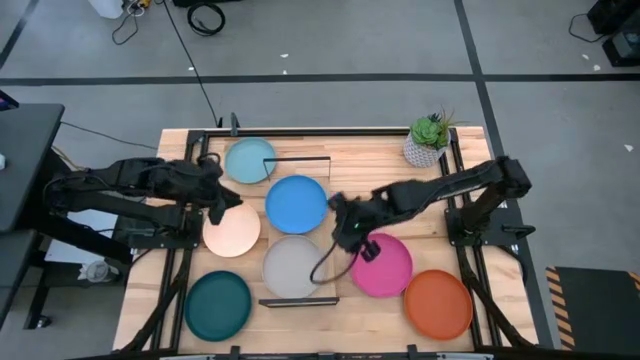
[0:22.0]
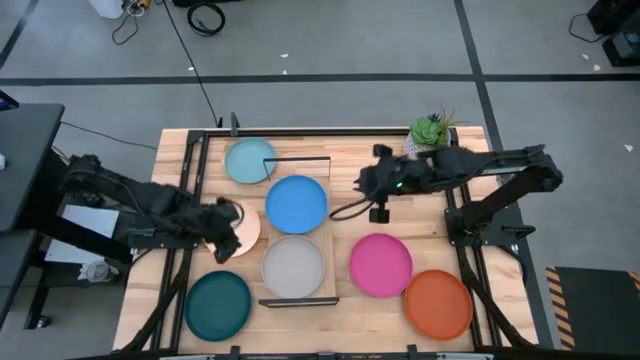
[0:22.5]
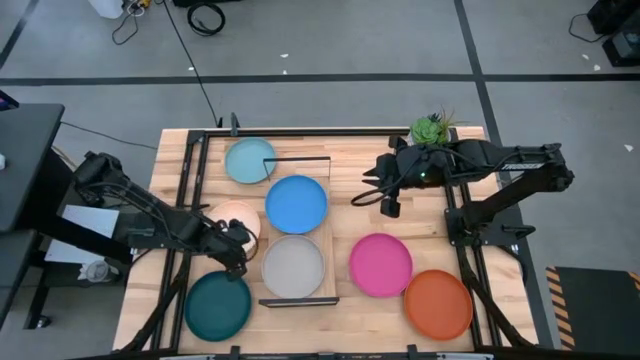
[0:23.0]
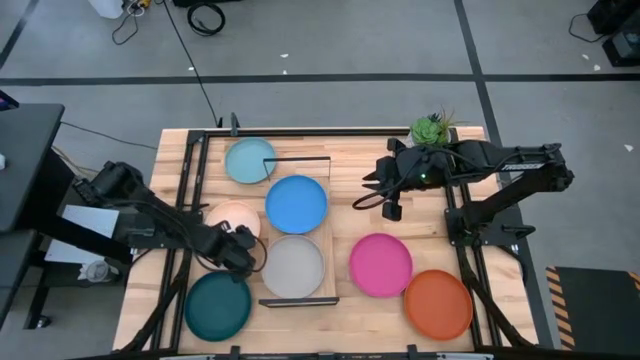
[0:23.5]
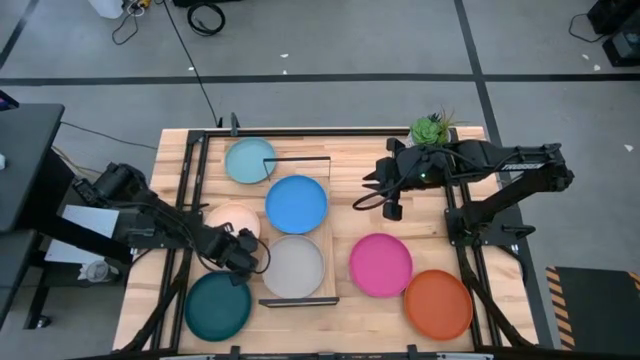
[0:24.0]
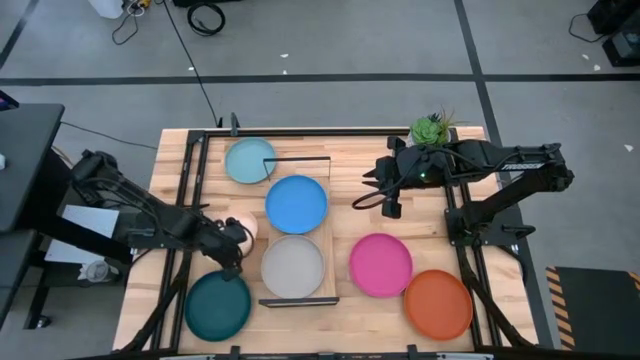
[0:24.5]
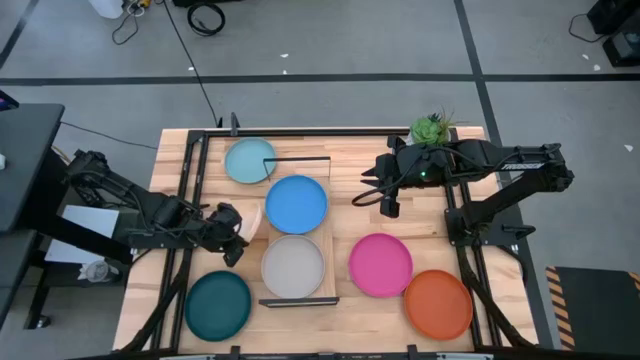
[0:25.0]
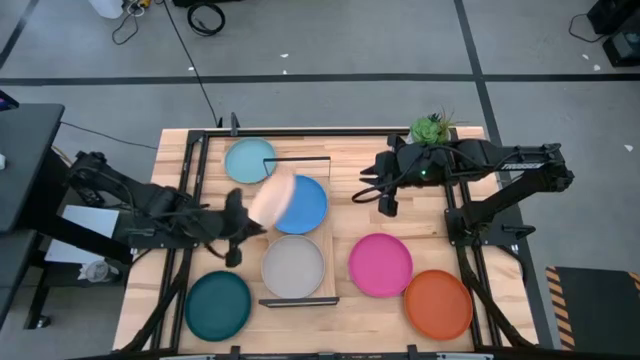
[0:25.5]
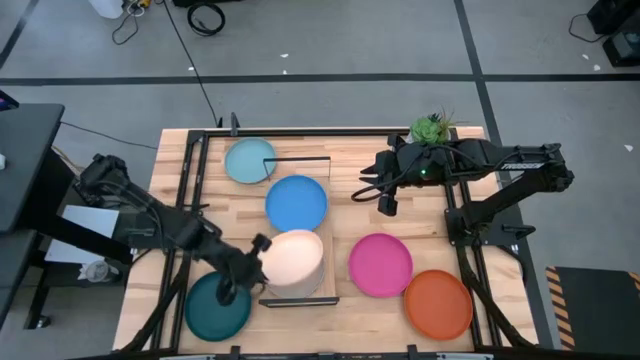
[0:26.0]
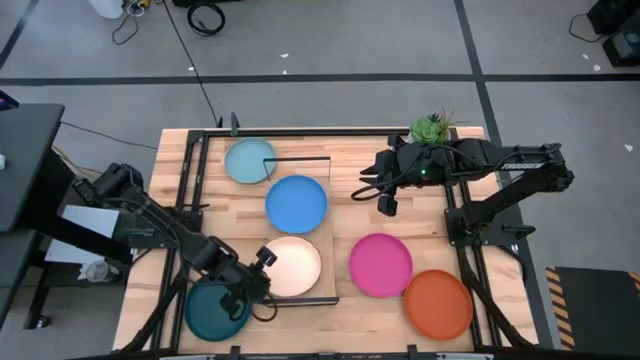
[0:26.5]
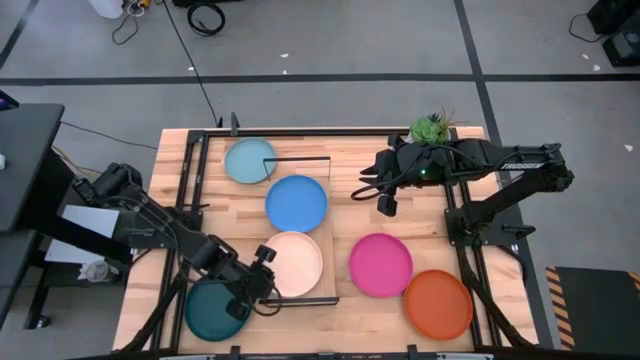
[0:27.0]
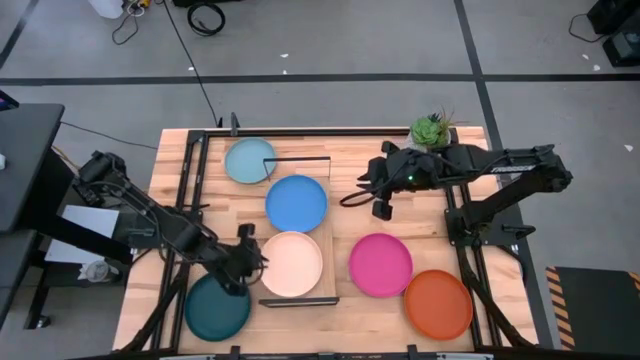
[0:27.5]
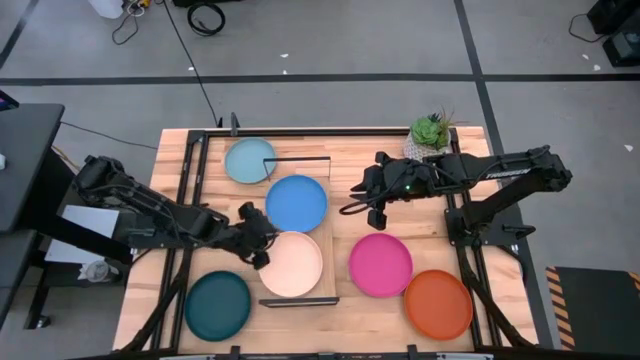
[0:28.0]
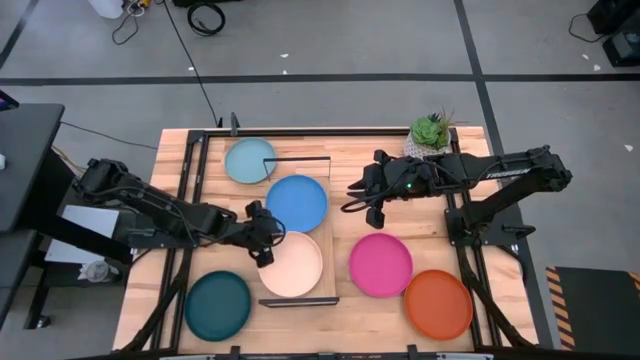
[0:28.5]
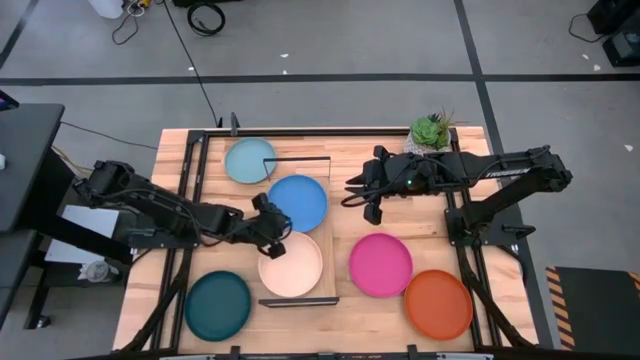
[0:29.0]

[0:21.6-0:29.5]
Task: Place and stack plates onto a shelf
Stack the light orange plate on top of the gray plate on the shelf

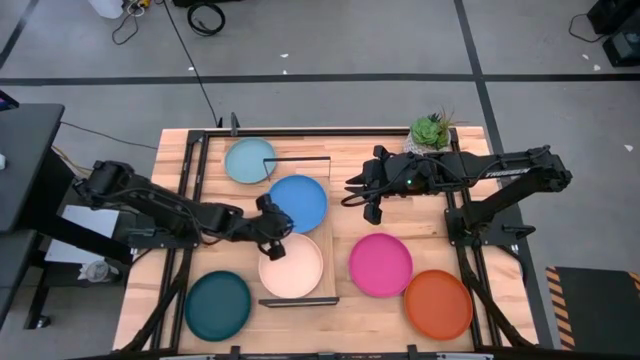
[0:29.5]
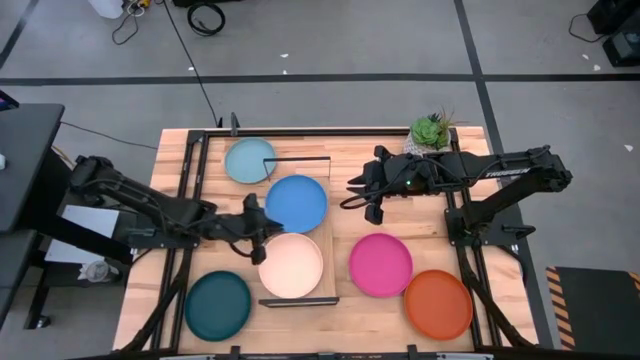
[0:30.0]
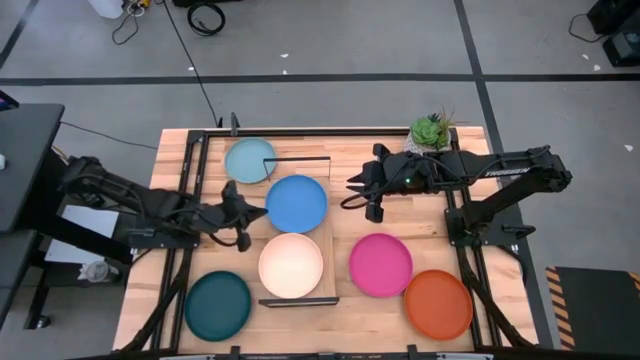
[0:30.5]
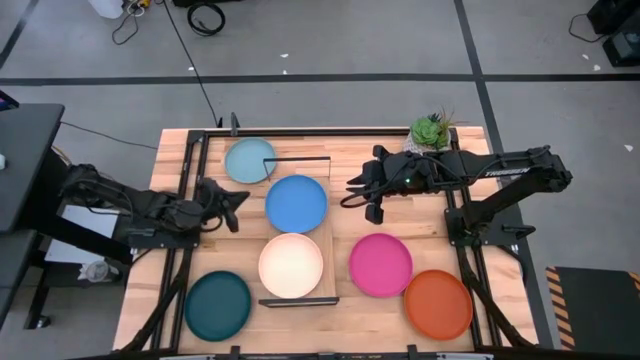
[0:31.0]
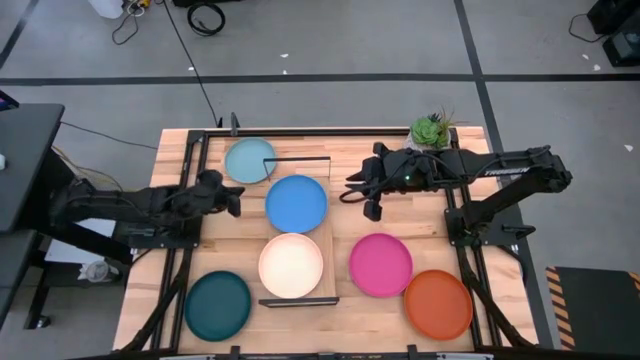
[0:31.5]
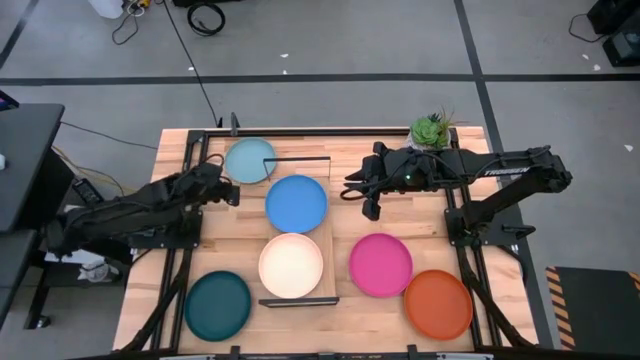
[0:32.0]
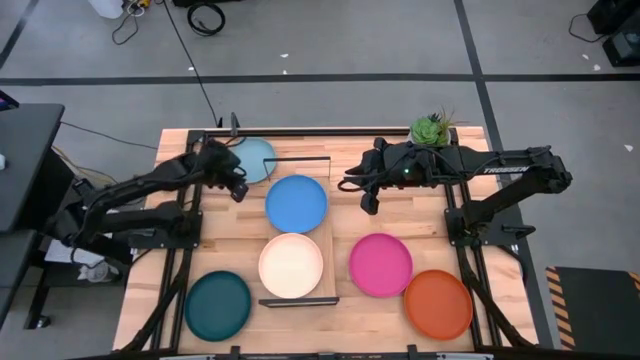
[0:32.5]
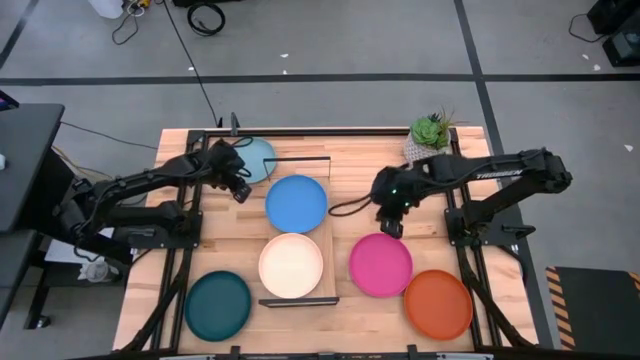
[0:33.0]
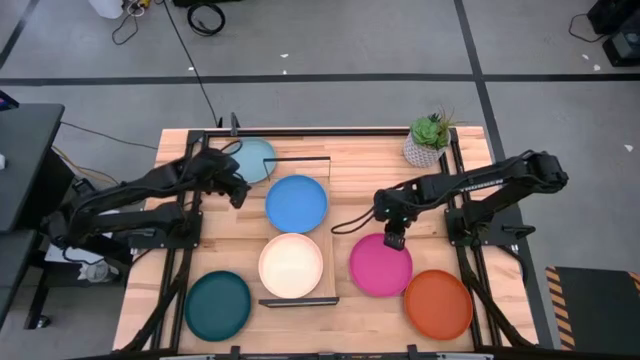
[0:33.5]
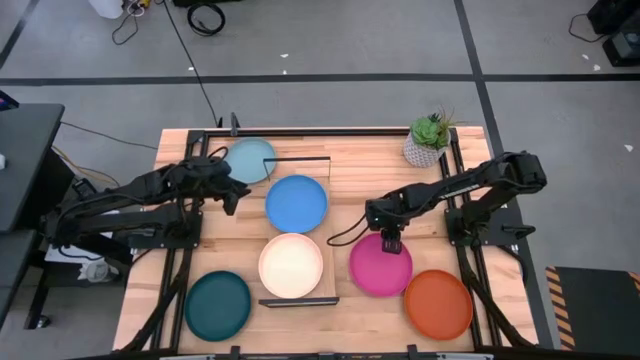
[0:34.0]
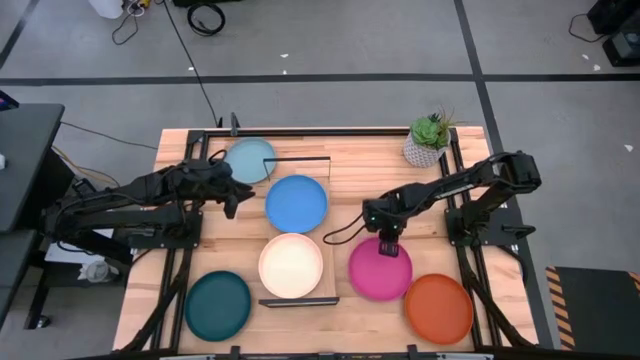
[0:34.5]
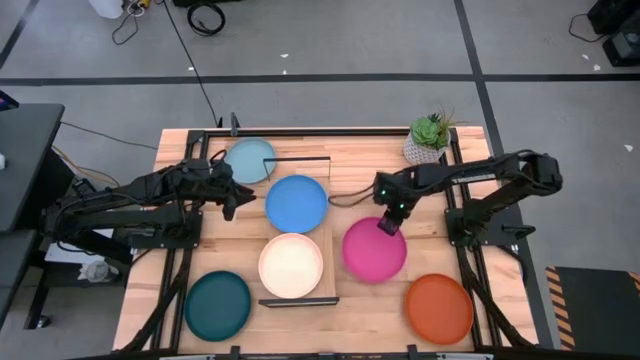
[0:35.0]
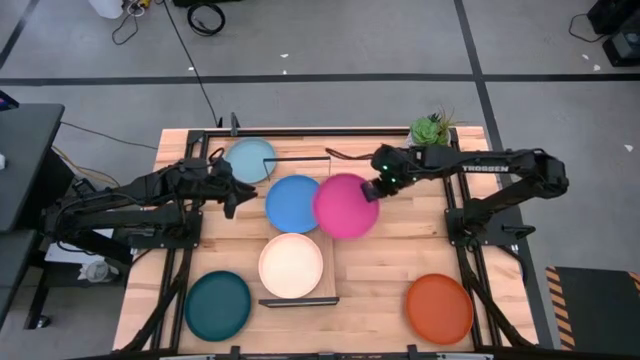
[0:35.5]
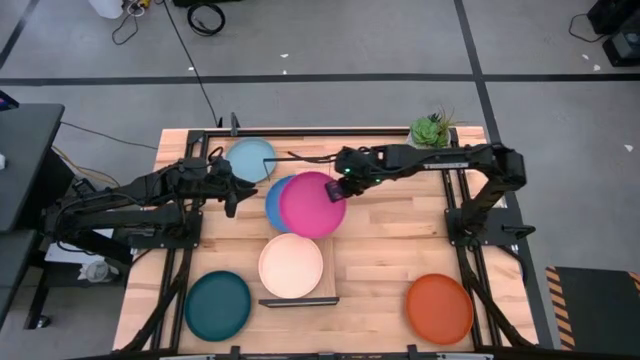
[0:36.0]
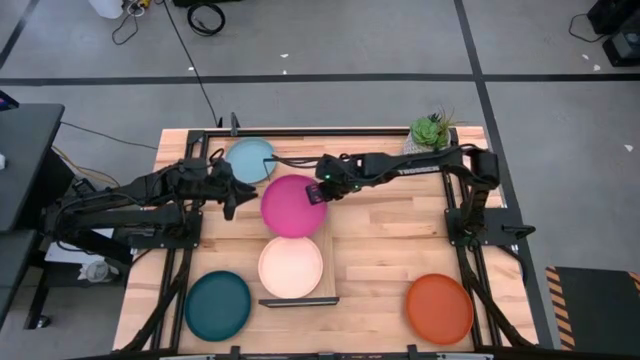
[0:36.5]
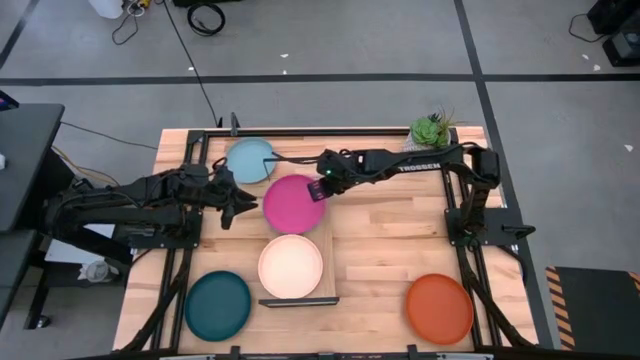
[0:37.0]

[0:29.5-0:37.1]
Stack the pink plate on top of the blue plate on the shelf

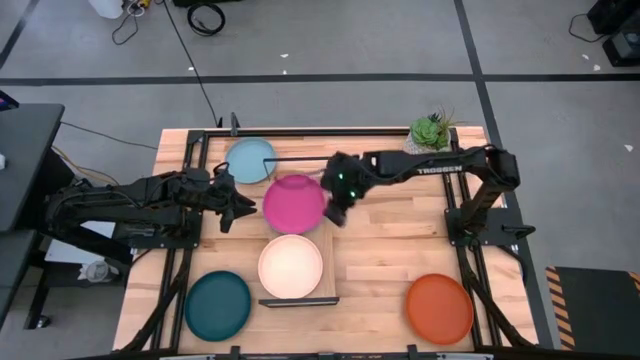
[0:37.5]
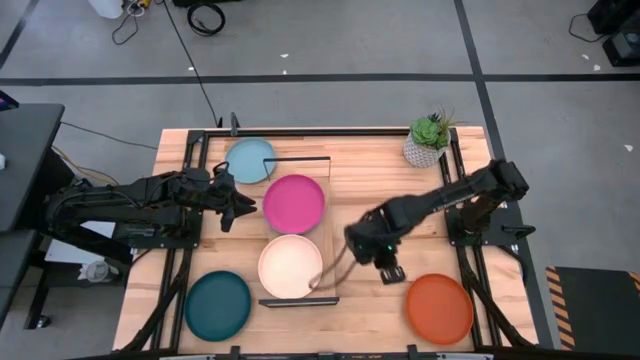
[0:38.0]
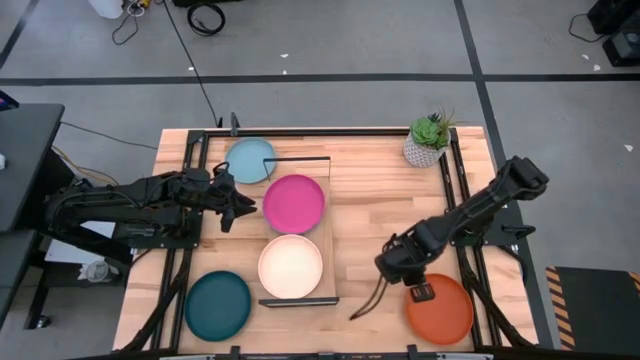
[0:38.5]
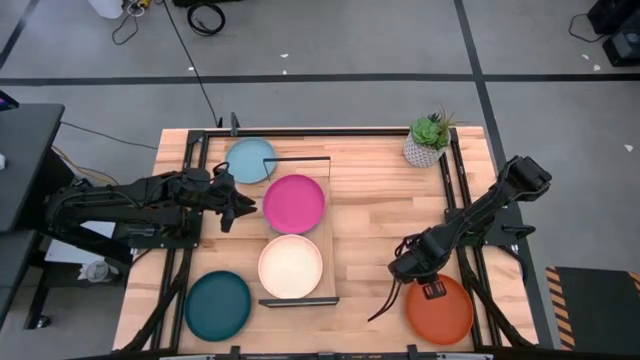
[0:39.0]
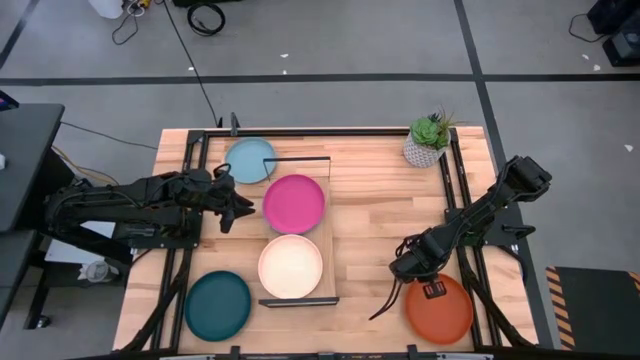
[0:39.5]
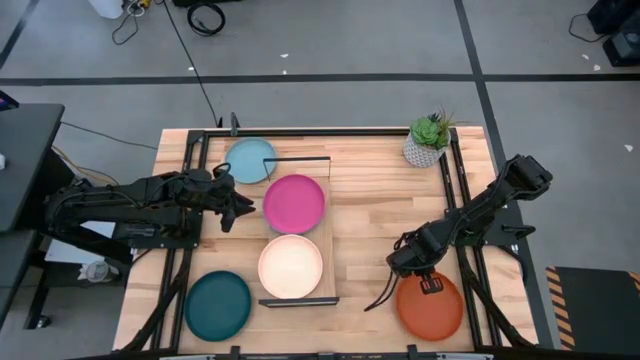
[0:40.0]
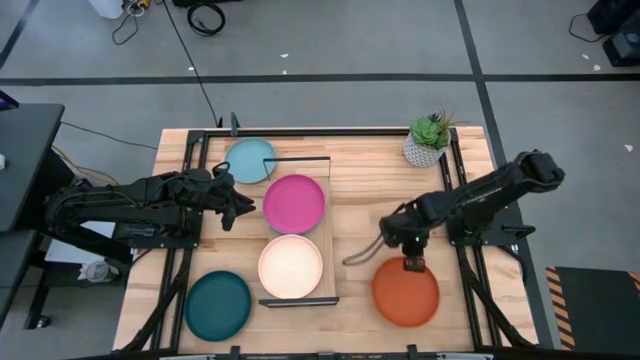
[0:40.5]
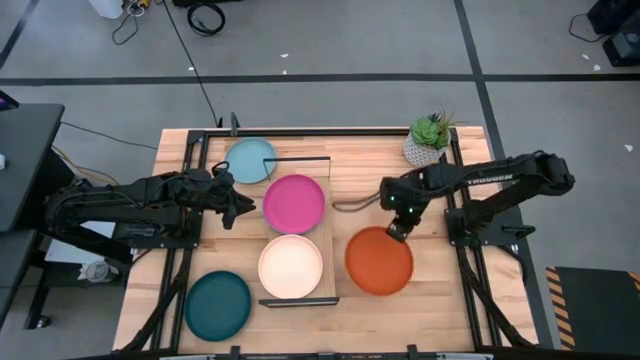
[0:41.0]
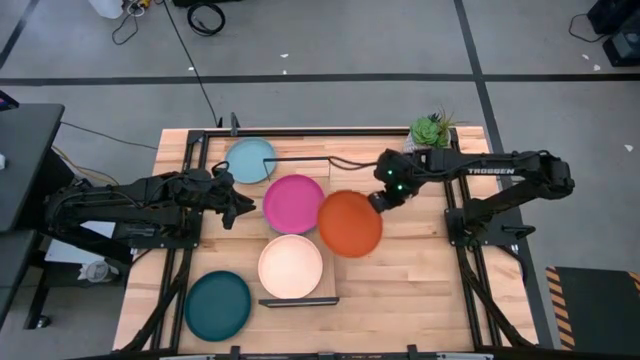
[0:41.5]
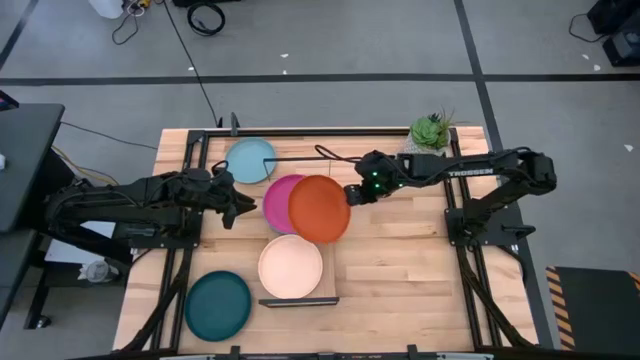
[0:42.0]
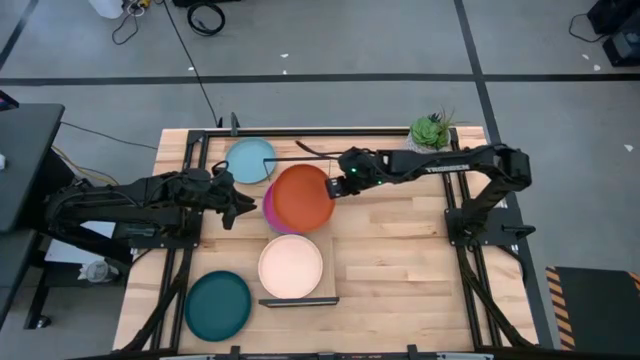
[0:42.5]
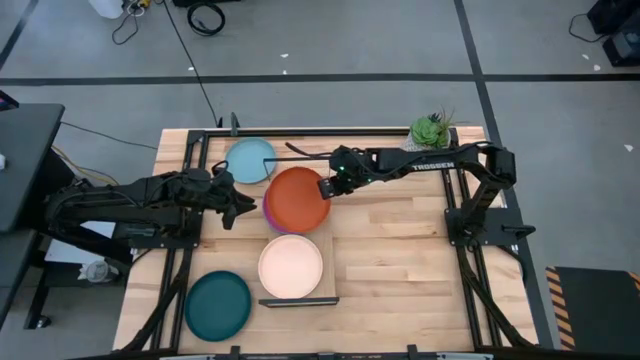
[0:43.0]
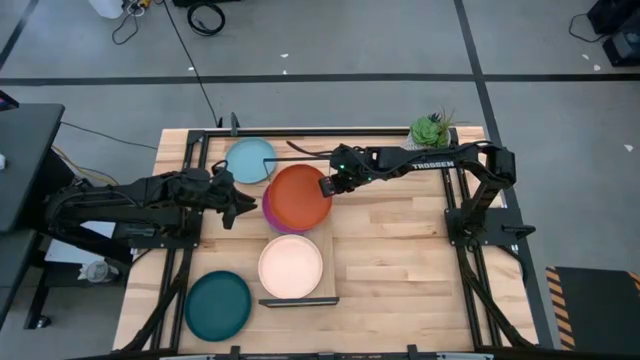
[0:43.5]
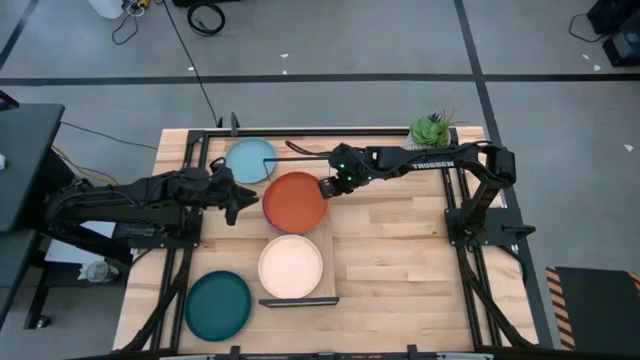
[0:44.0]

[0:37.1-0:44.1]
Stack the orange plate on top of the pink plate on the shelf
